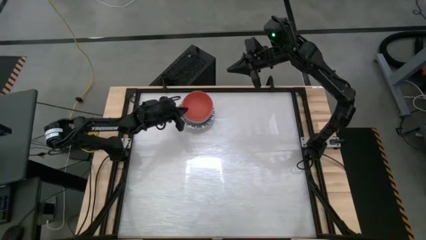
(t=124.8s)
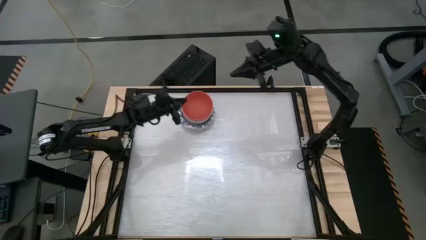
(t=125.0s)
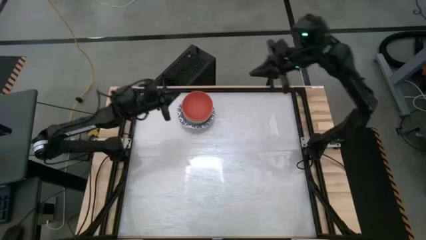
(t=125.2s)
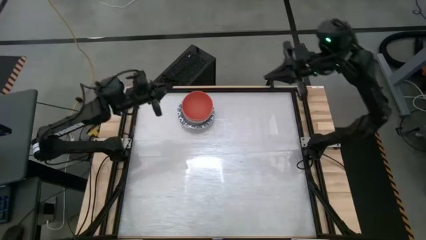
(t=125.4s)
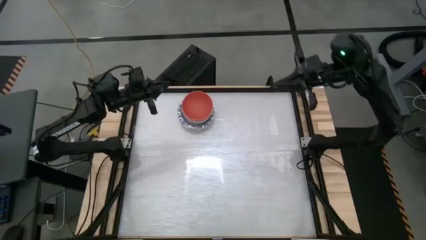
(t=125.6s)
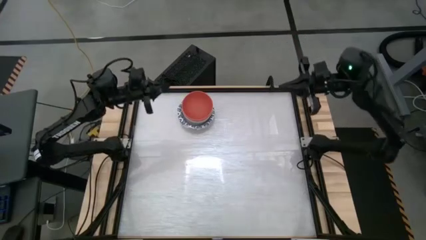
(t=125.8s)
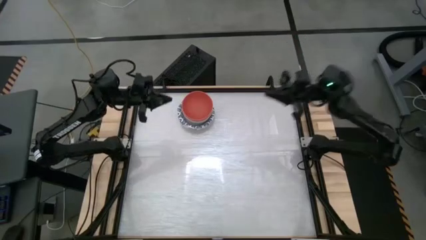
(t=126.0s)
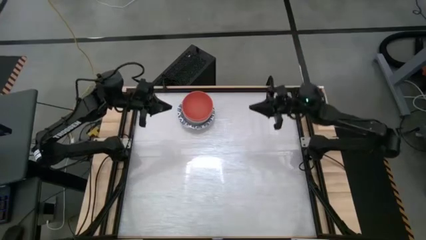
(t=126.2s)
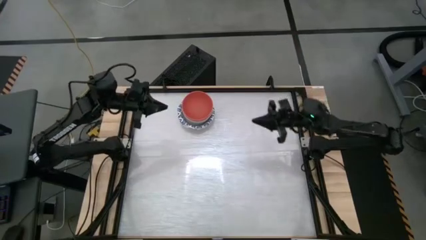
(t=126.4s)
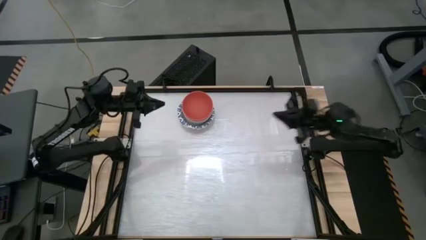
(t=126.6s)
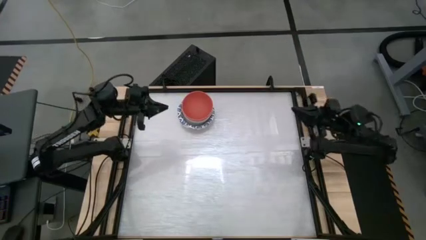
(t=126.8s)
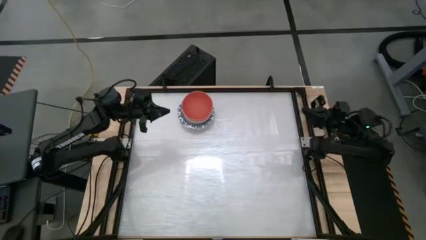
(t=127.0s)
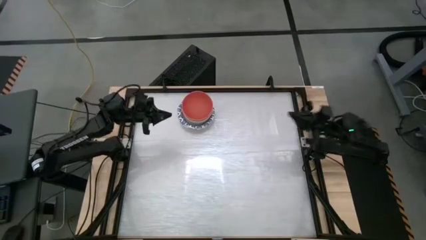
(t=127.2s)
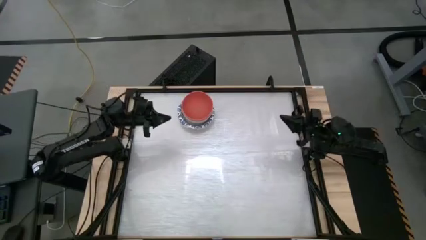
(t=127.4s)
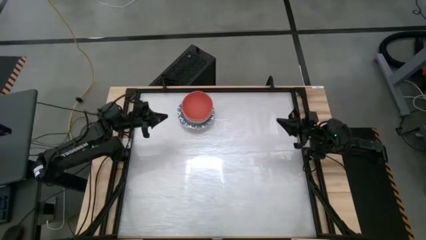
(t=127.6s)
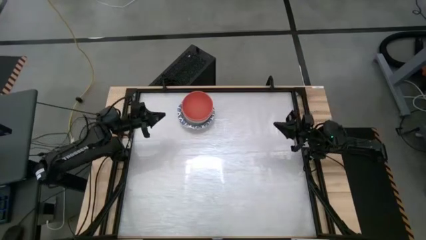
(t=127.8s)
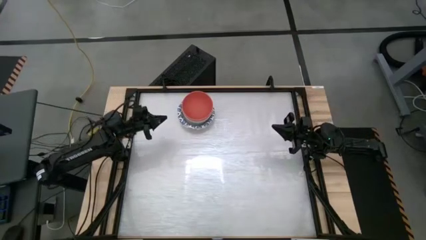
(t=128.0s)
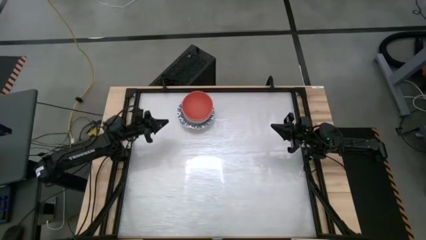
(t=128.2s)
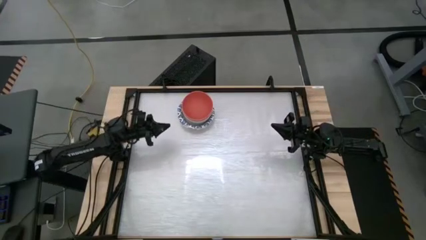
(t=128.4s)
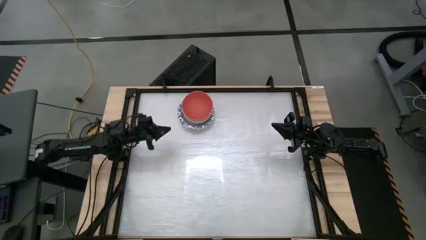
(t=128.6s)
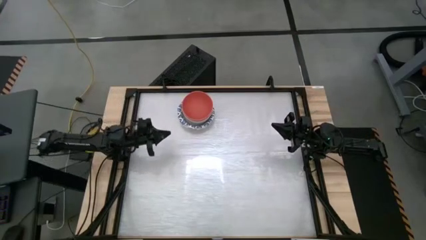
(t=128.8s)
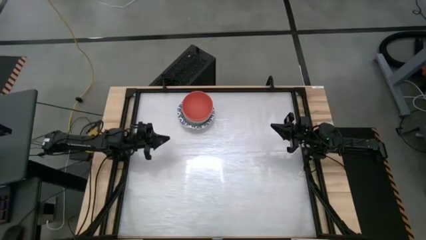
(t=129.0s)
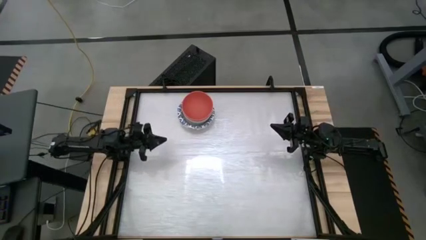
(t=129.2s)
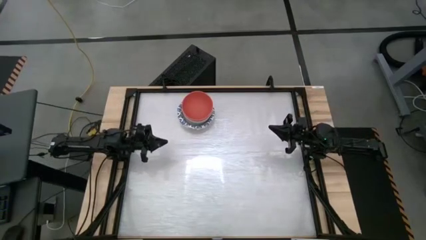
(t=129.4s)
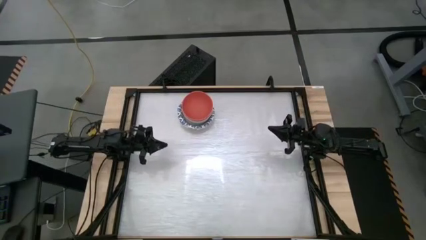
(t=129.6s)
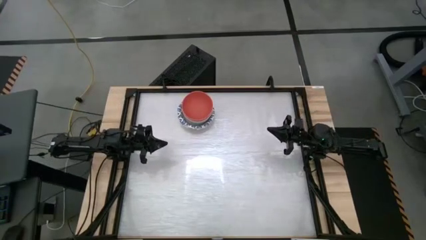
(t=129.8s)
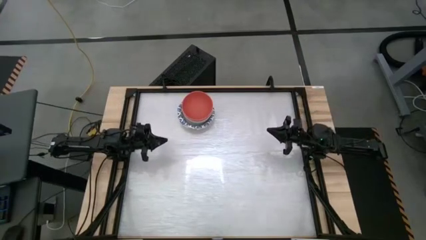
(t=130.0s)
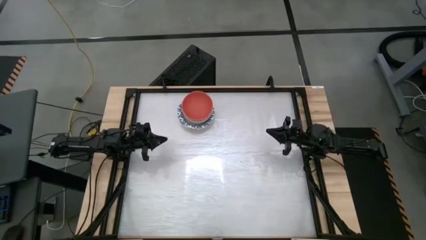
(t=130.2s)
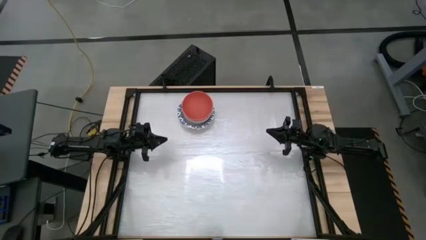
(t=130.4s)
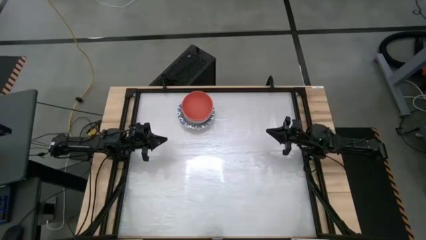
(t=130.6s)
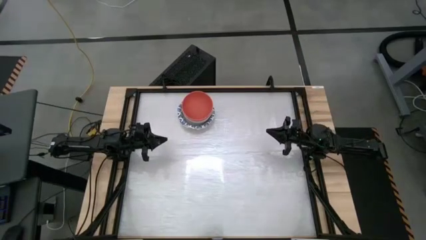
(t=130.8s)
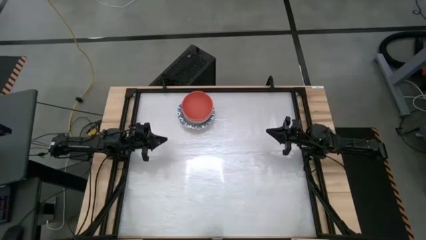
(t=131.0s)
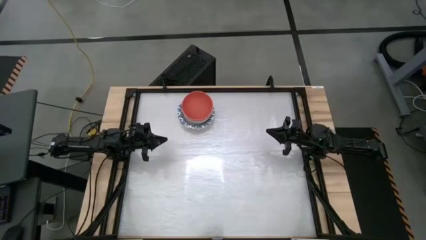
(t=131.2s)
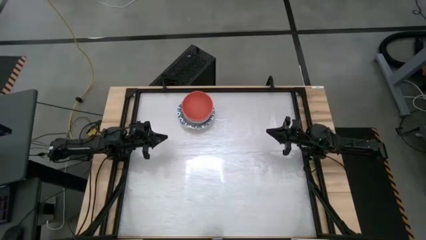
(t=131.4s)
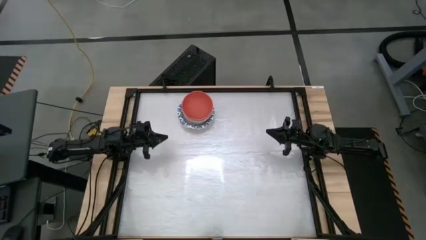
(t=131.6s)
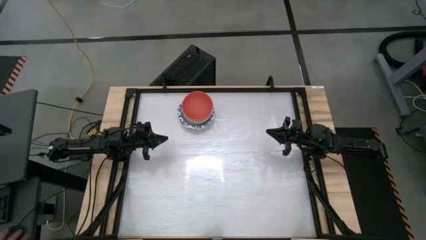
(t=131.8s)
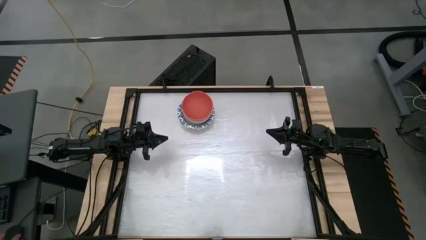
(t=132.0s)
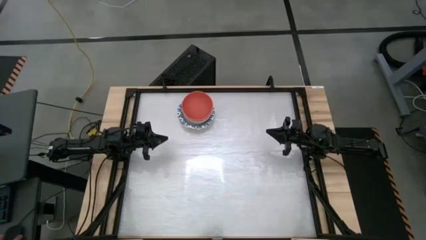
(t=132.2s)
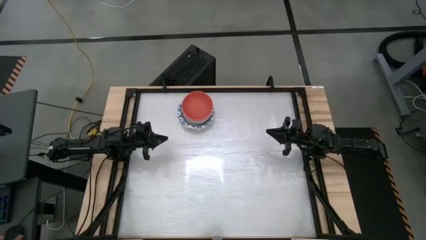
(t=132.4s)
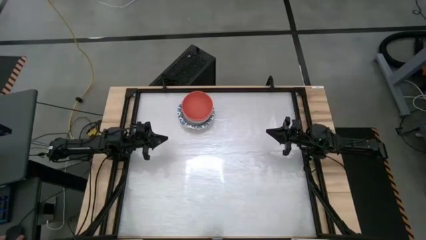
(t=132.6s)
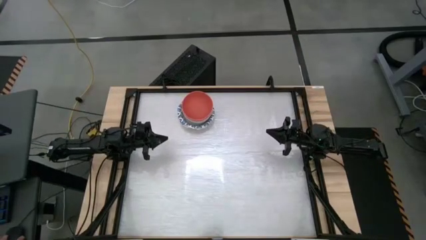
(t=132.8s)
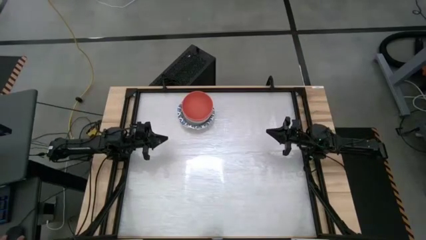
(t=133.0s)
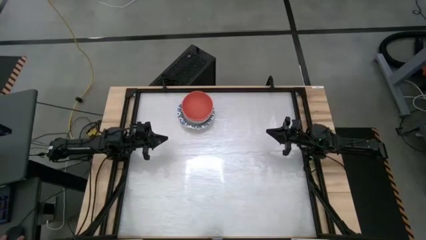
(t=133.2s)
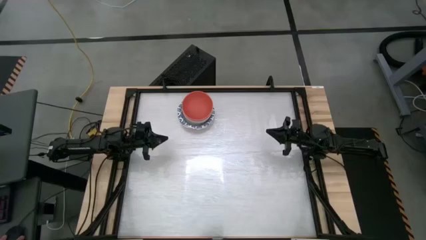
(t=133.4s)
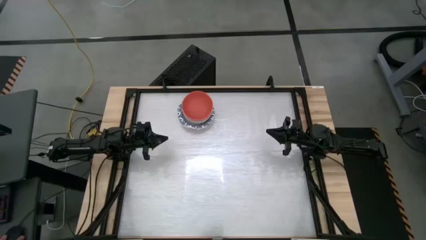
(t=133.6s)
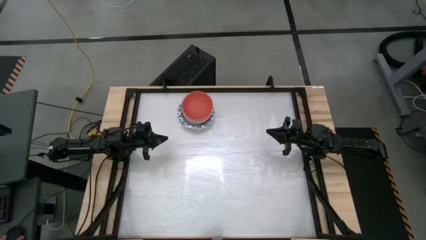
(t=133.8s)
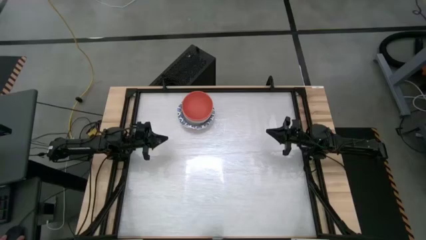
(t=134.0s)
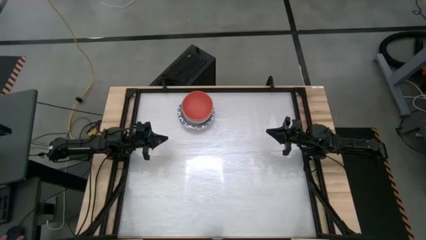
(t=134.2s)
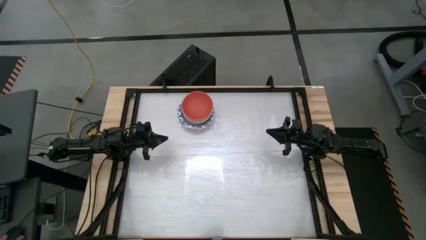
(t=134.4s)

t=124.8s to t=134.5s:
Return to Home Position
